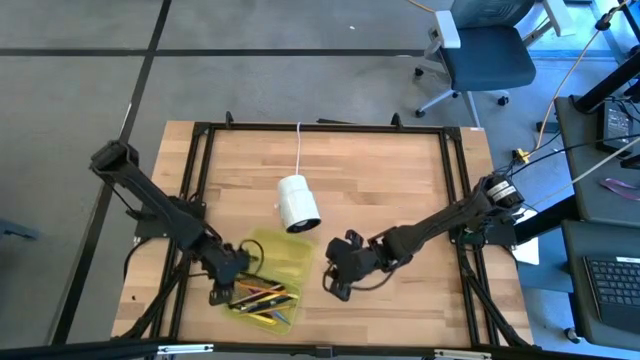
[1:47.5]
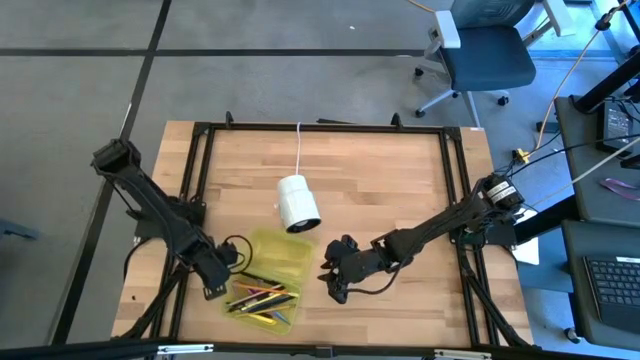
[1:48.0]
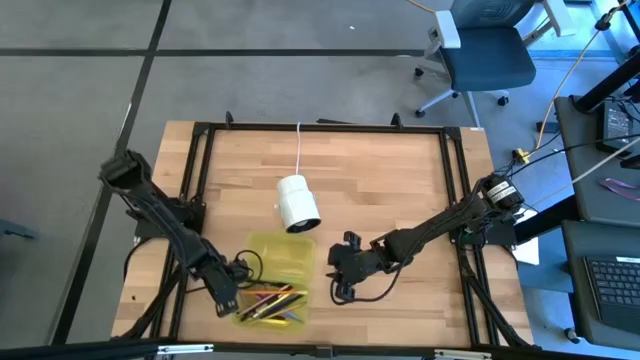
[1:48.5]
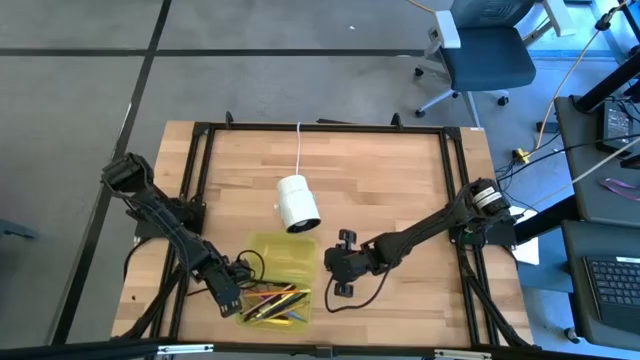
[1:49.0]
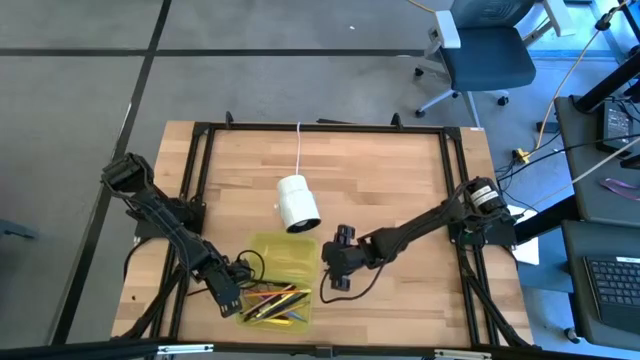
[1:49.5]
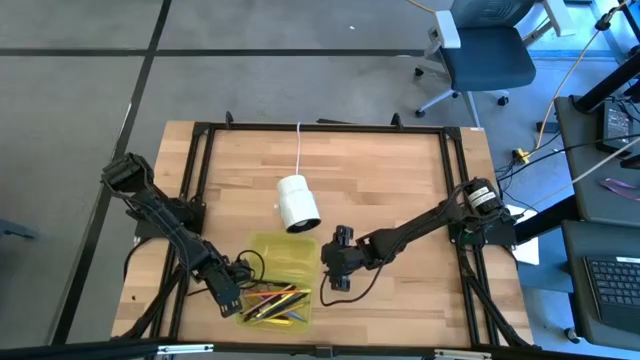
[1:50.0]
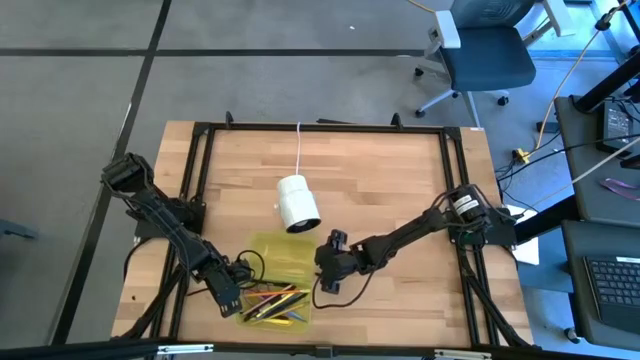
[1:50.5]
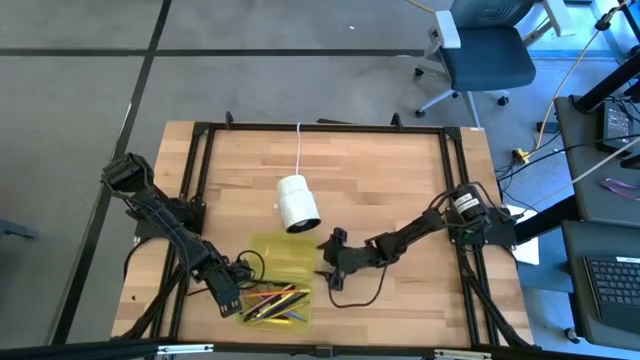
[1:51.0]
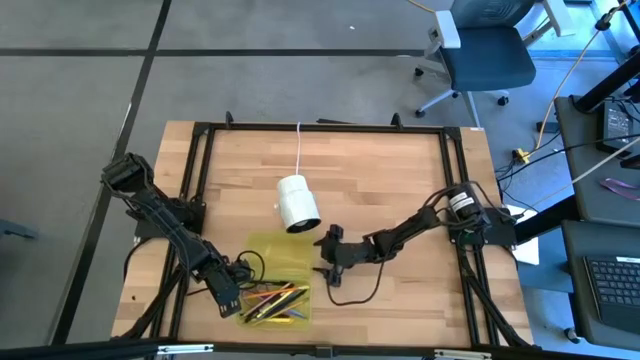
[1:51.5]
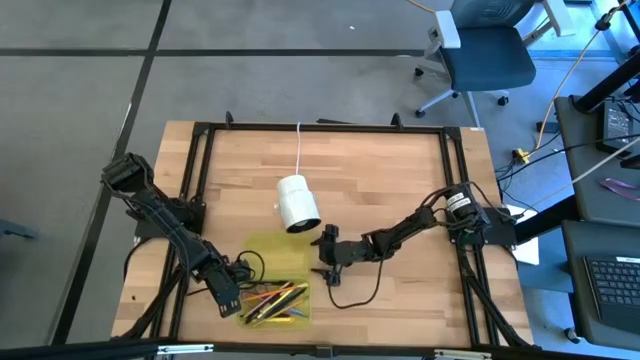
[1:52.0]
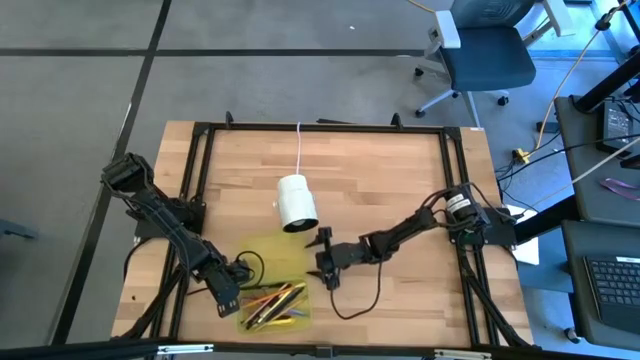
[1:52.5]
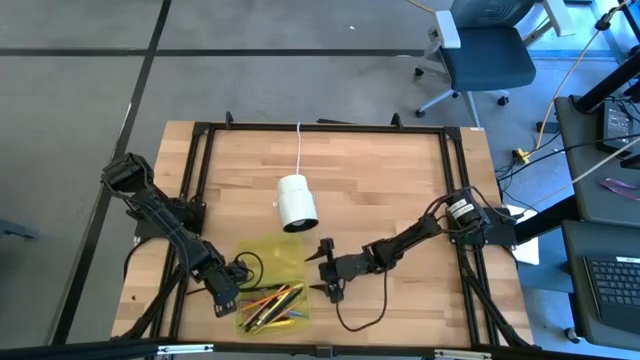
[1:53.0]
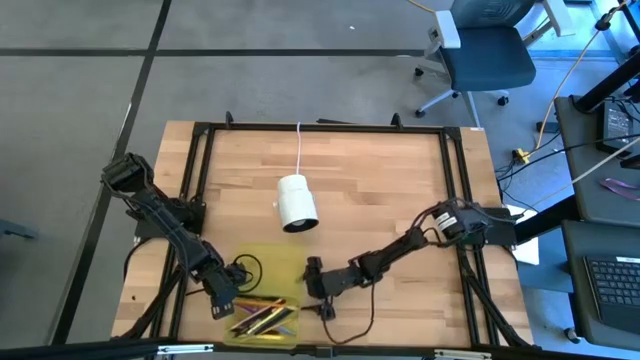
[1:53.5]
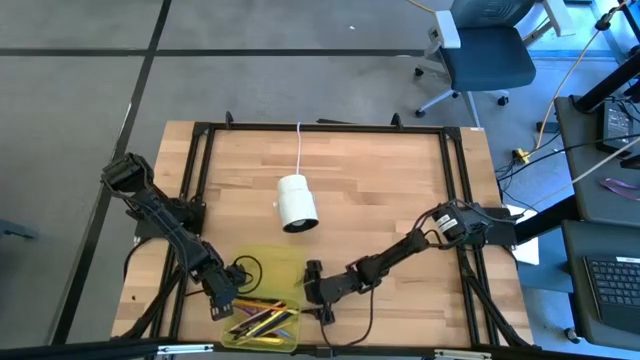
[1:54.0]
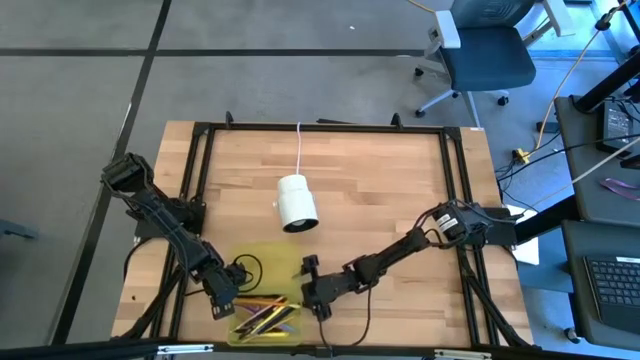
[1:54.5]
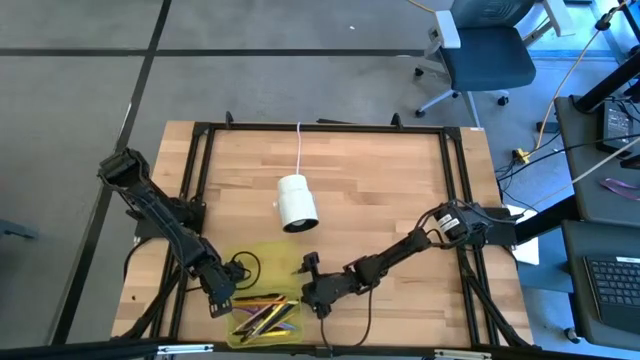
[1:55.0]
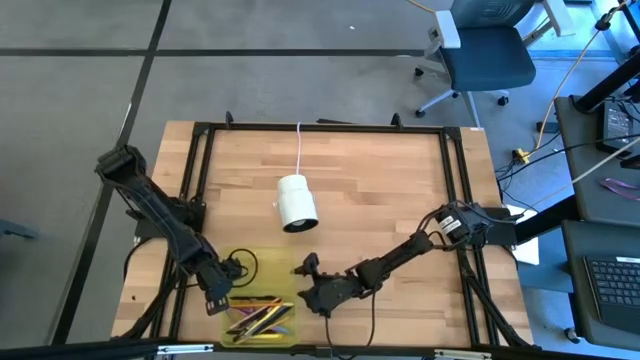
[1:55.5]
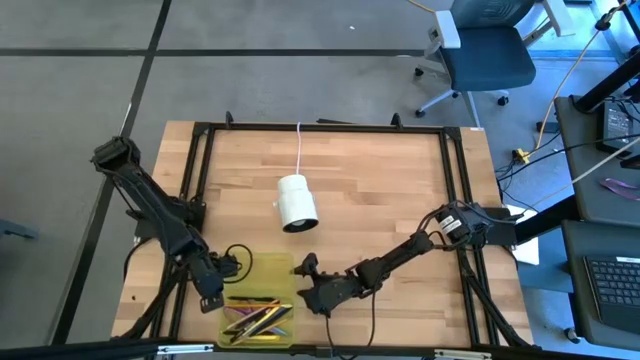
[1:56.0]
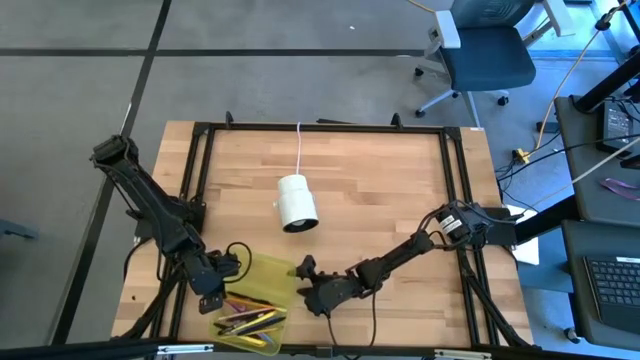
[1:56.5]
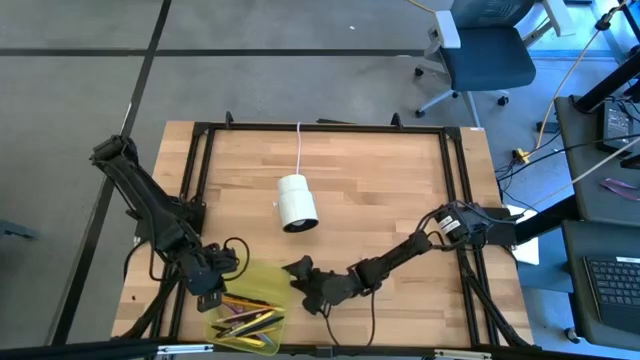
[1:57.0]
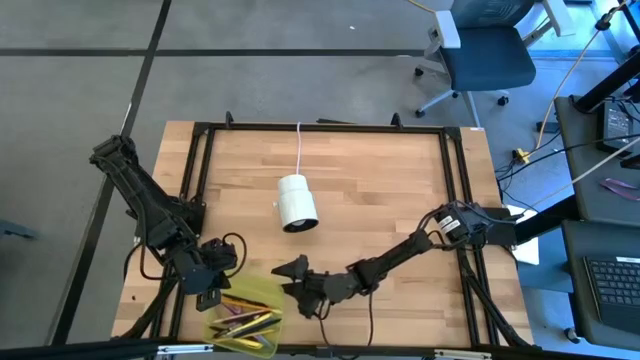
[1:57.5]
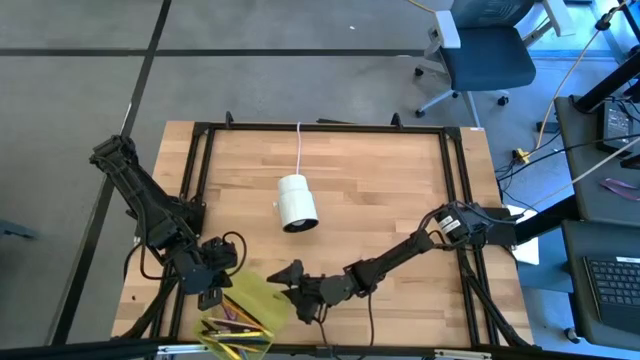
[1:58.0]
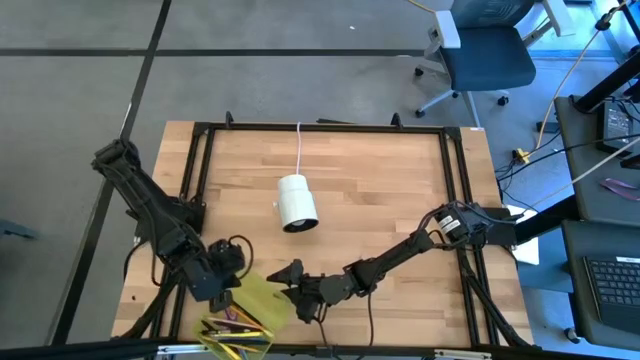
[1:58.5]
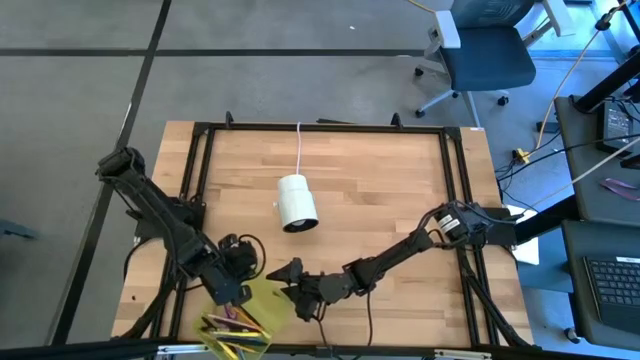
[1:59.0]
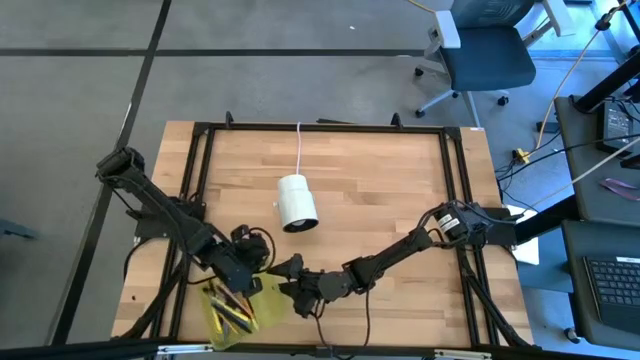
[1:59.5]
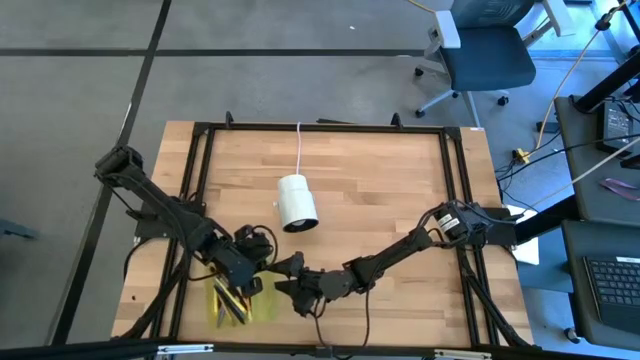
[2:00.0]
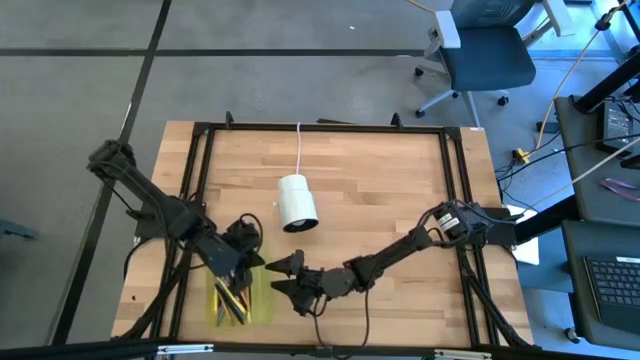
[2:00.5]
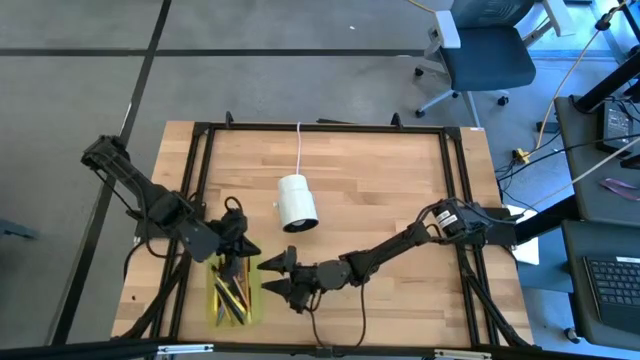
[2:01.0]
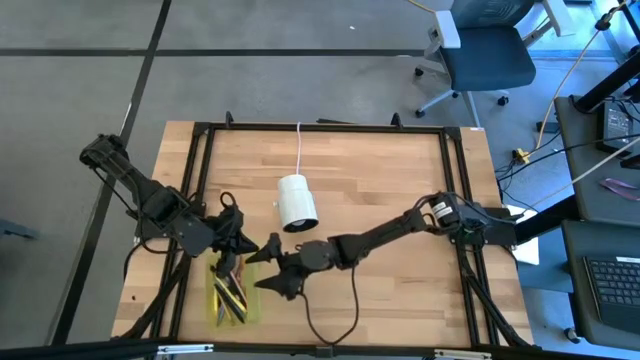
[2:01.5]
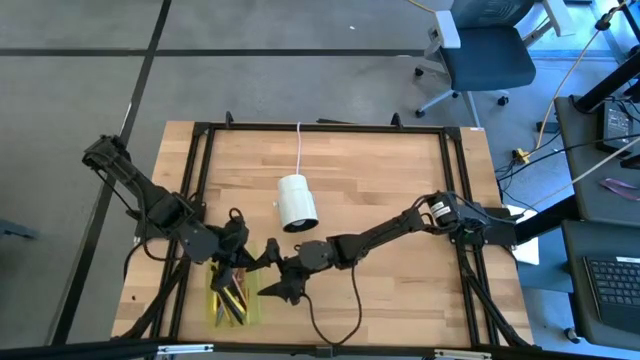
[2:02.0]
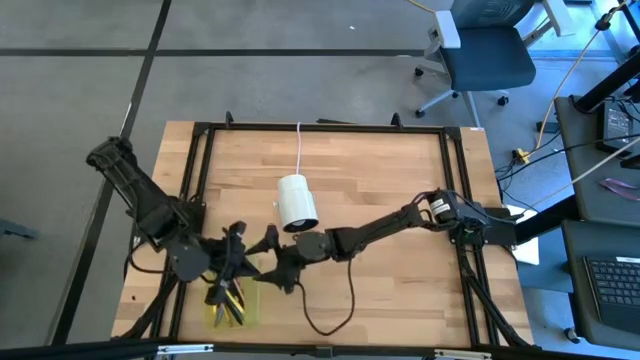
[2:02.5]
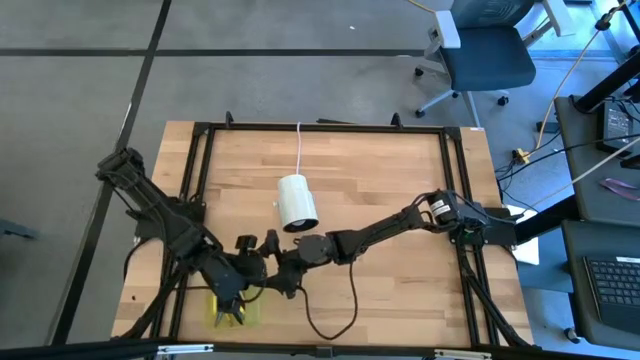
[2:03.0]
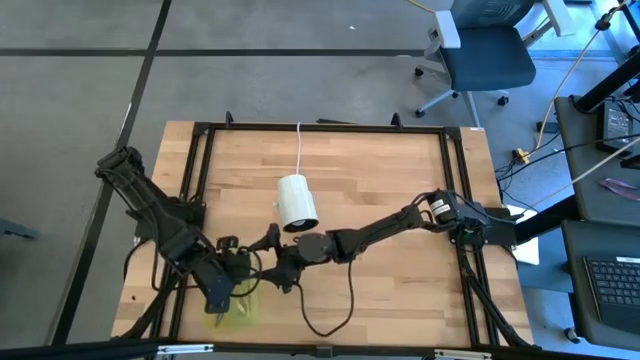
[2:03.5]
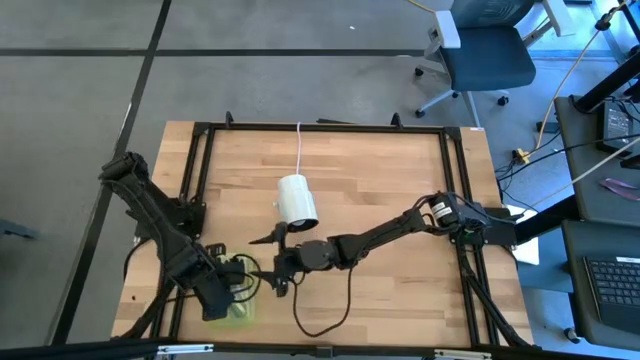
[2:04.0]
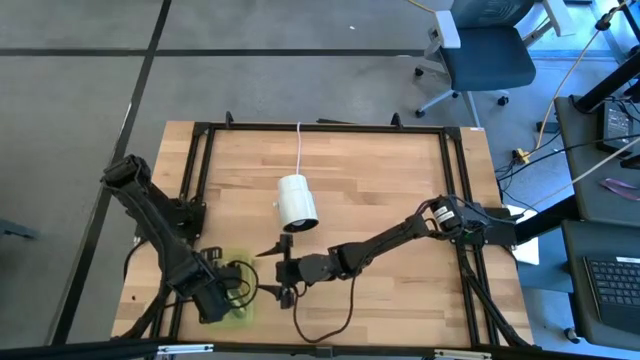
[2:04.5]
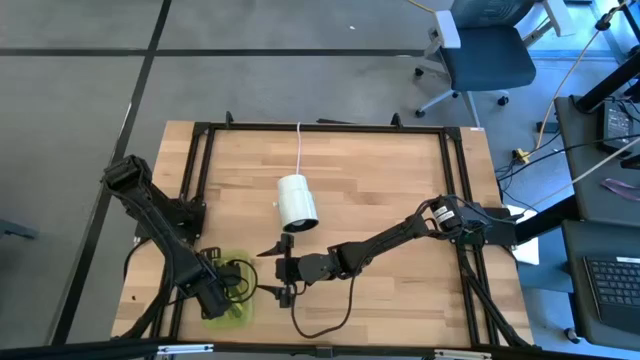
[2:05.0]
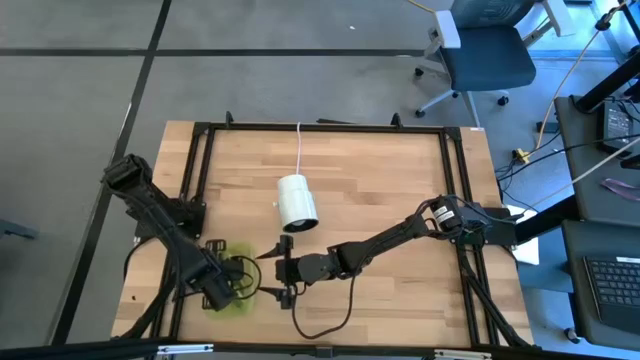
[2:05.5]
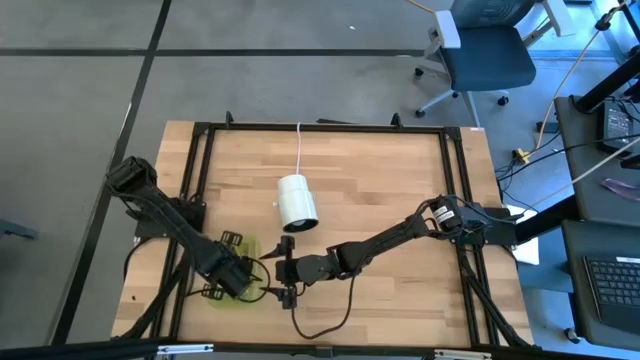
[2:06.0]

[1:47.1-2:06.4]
Task: Pick & place school supplies into a supply box
Close the supply box

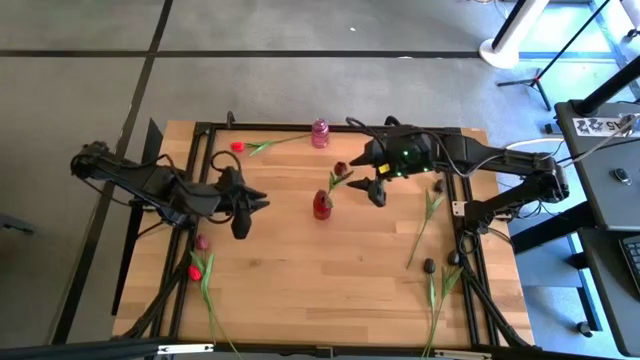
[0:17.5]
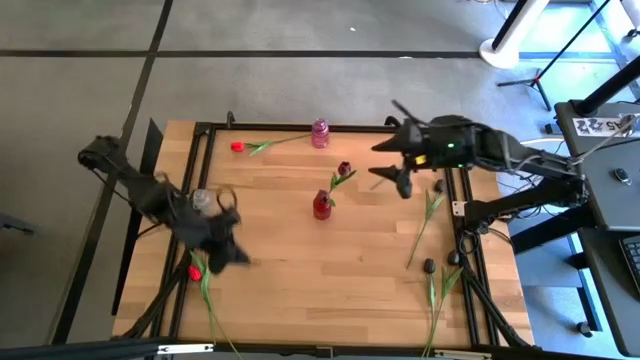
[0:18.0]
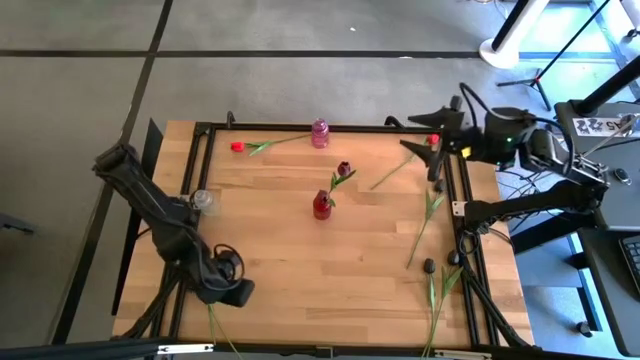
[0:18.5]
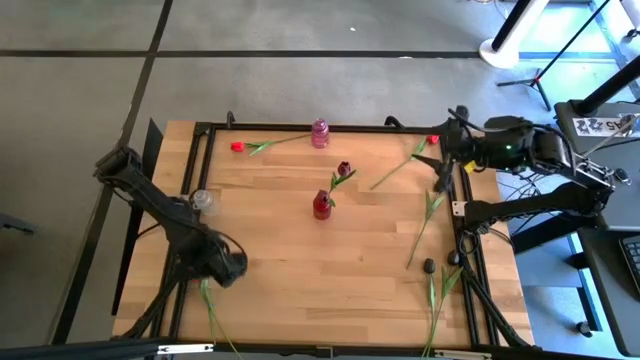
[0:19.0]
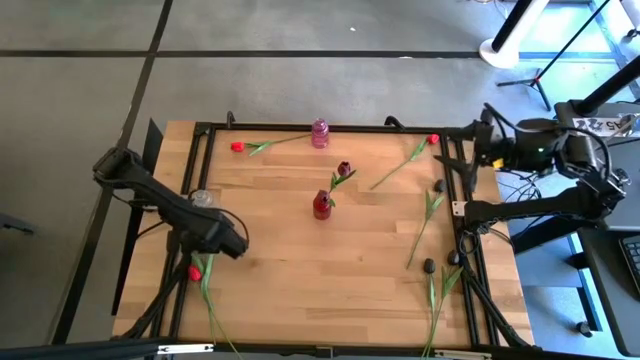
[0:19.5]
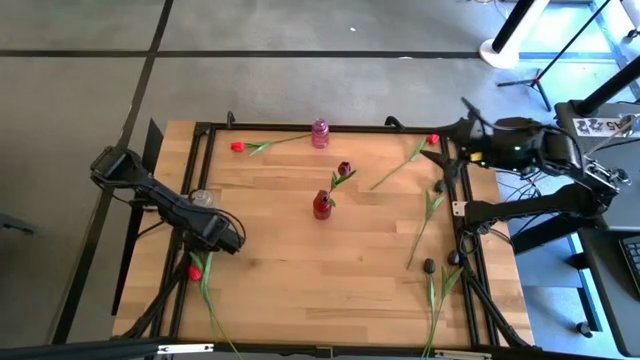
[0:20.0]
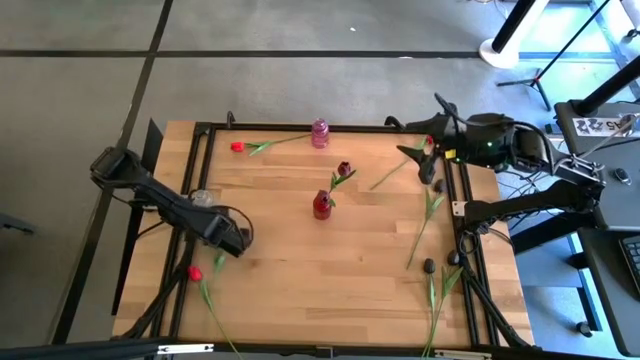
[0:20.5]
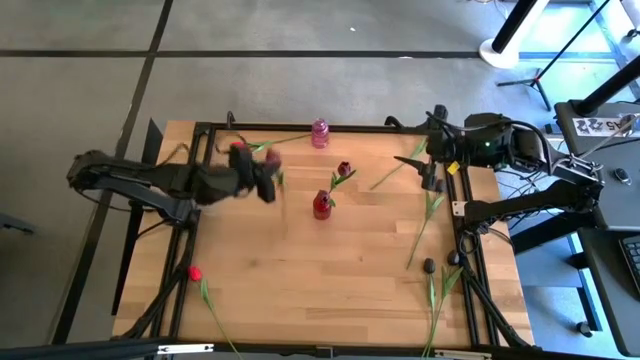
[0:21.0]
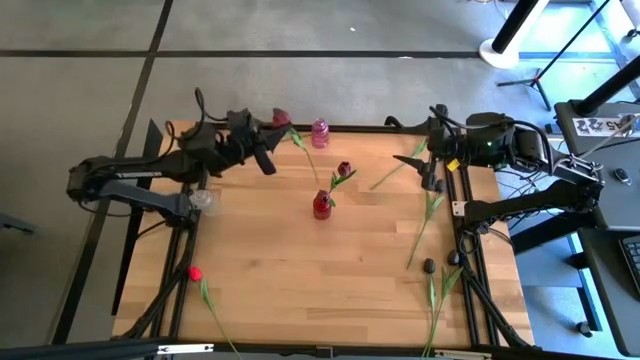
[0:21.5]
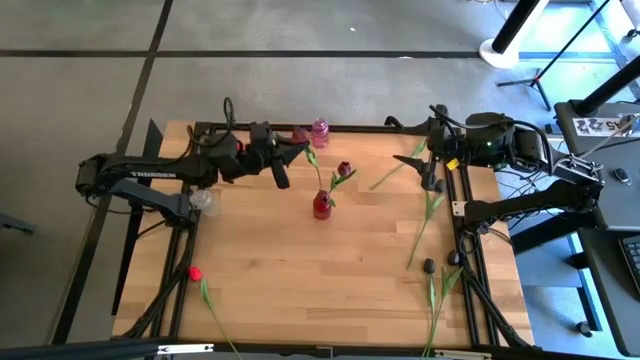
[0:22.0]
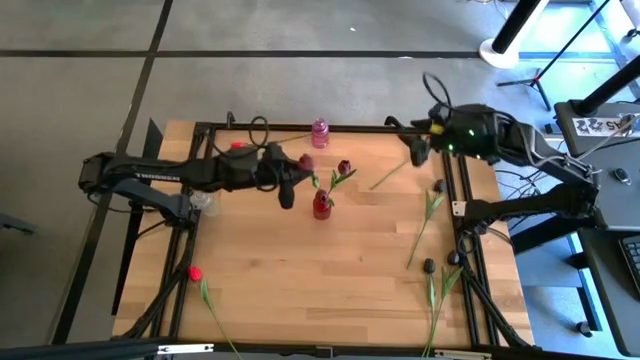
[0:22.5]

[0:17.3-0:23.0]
Task: Sort flowers into vase by color
Put the dark red flower into the red vase
